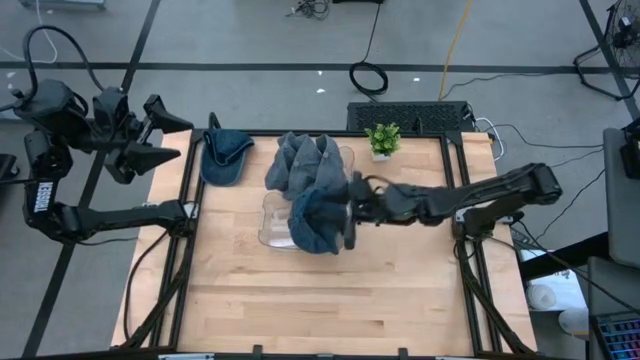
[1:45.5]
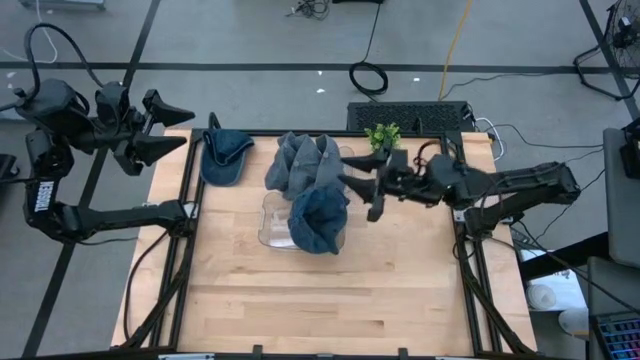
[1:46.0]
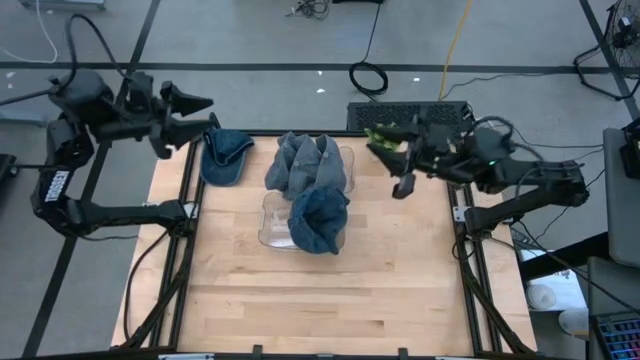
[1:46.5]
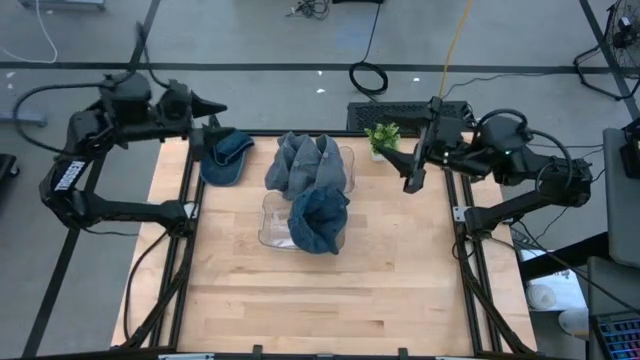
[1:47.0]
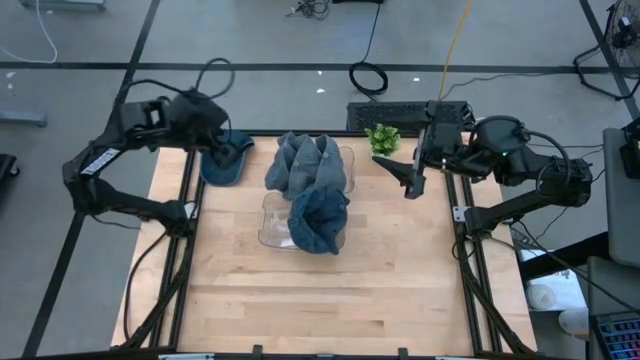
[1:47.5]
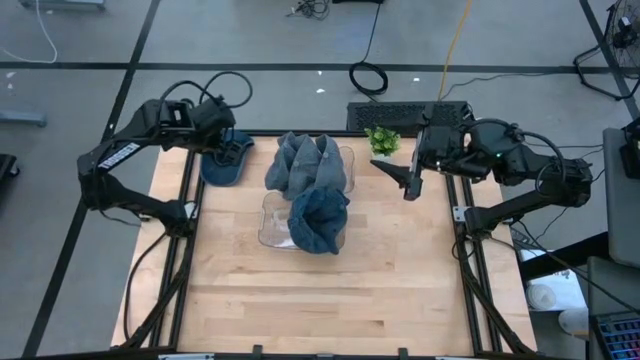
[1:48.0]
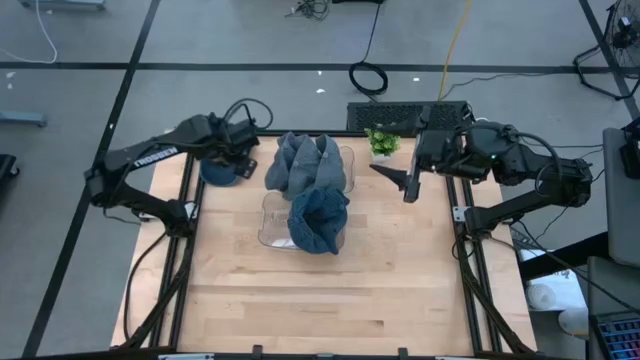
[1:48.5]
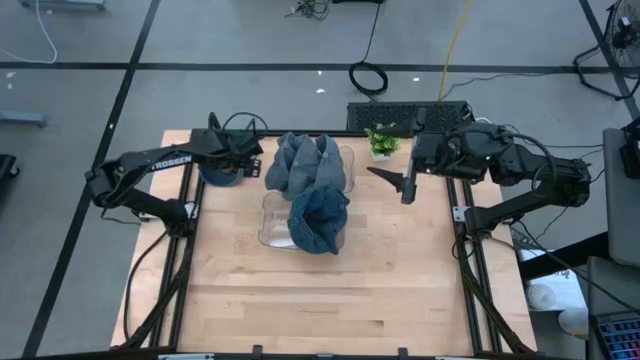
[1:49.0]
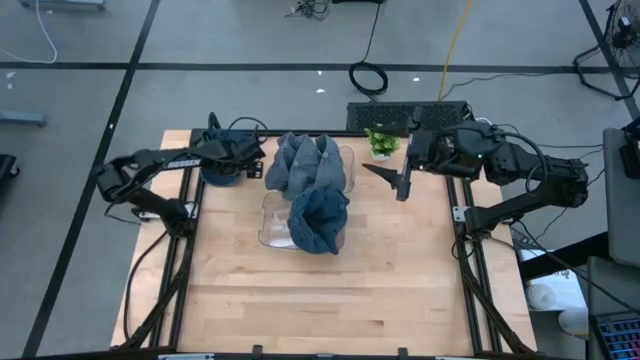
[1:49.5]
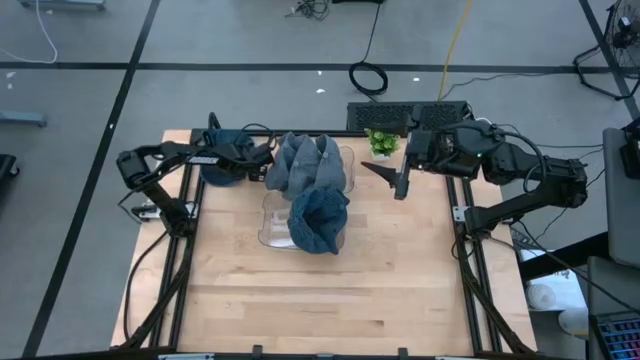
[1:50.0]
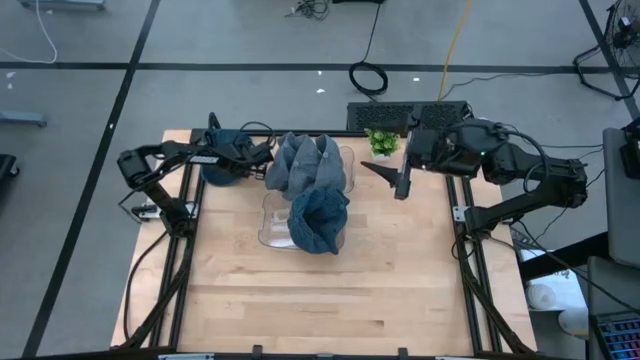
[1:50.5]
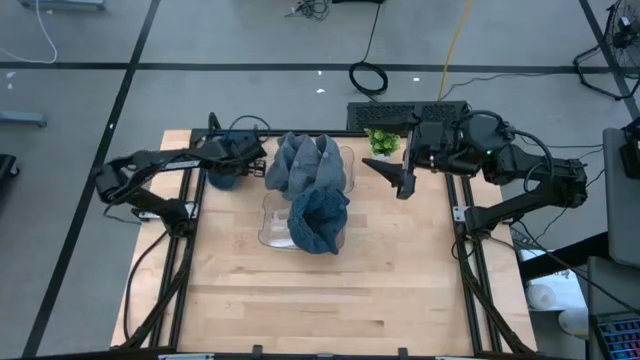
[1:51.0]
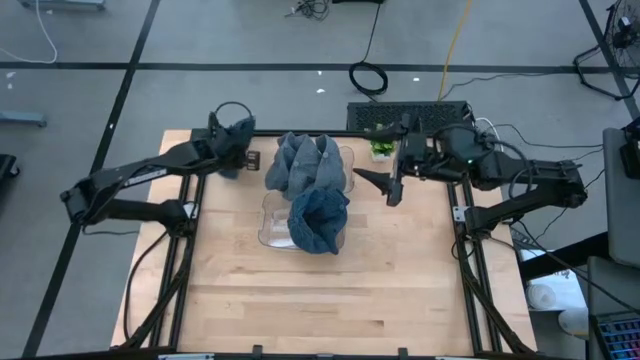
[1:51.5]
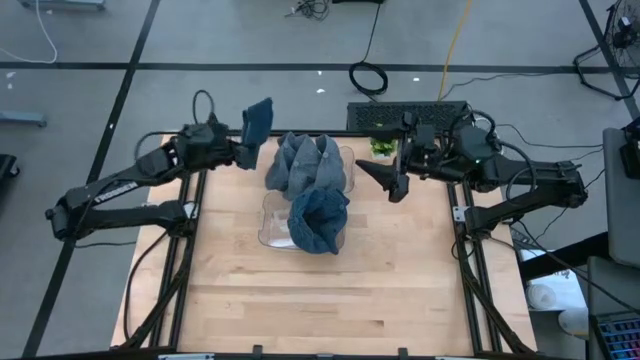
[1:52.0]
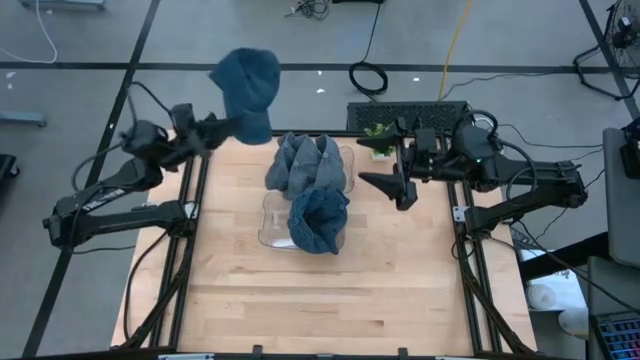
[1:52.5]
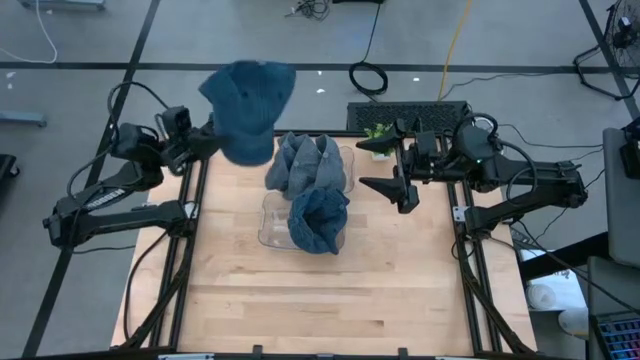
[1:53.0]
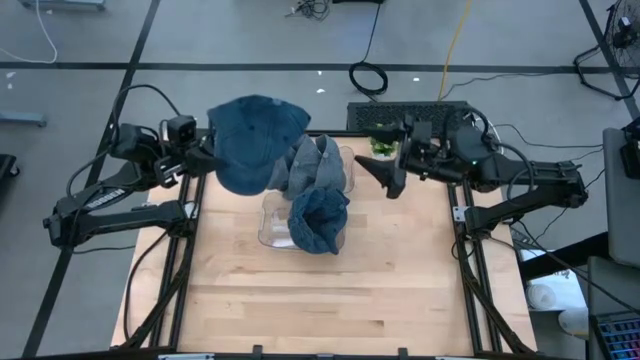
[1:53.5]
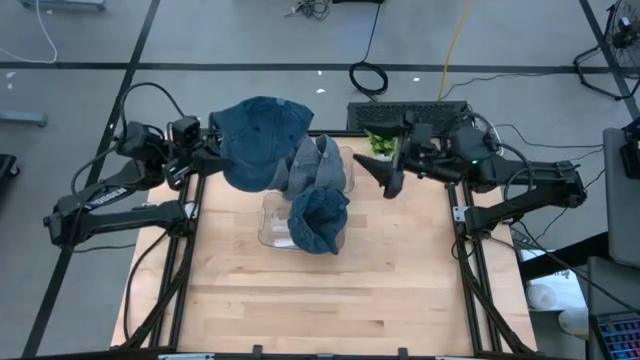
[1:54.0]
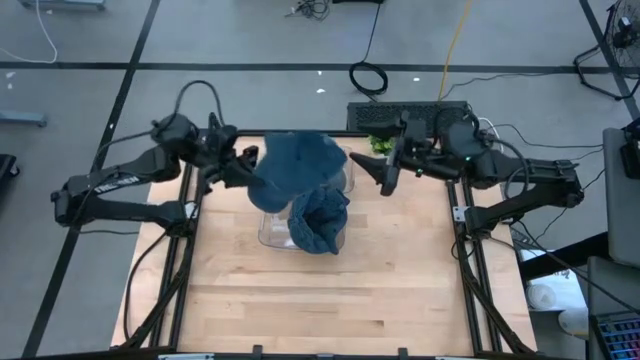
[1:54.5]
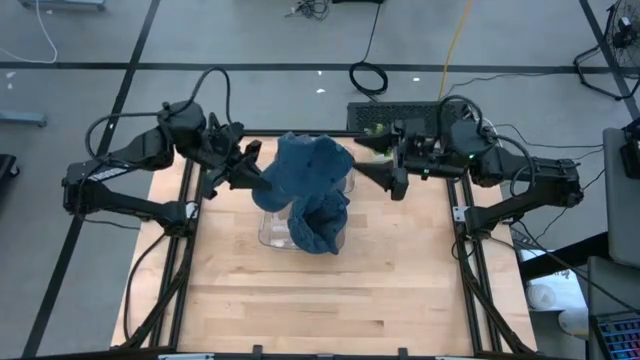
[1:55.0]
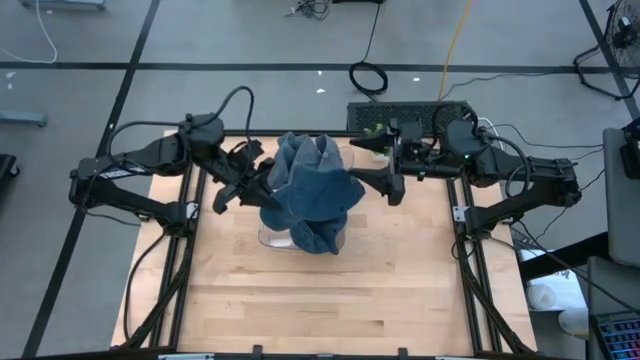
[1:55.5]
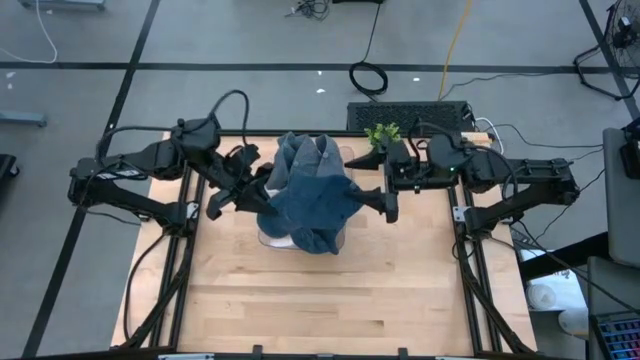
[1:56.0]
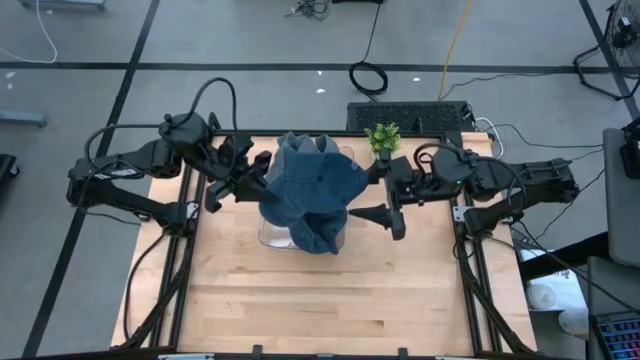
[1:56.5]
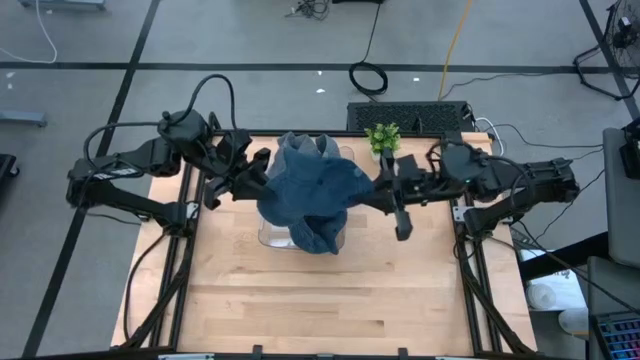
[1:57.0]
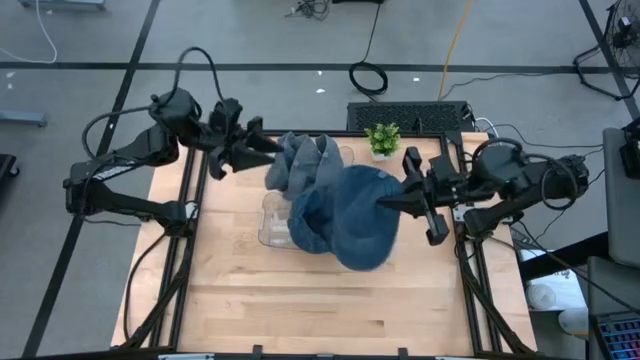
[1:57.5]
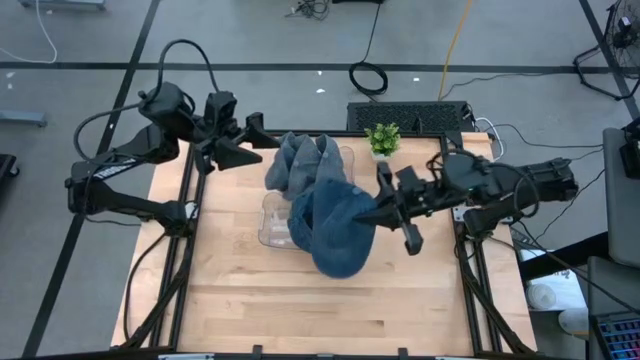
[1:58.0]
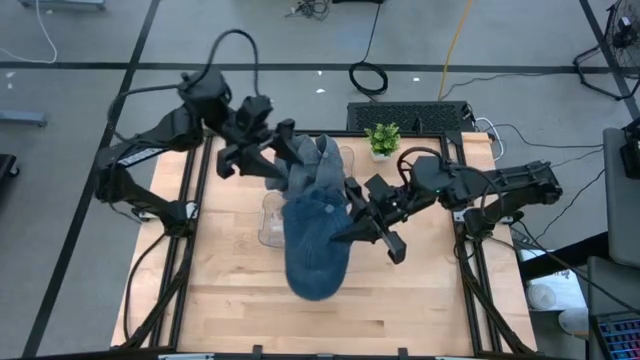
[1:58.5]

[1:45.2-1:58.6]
Task: Pick & Place hat
Put the blue cap into the bottom transparent bin

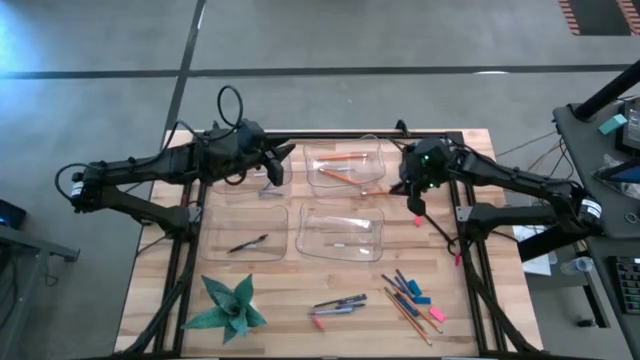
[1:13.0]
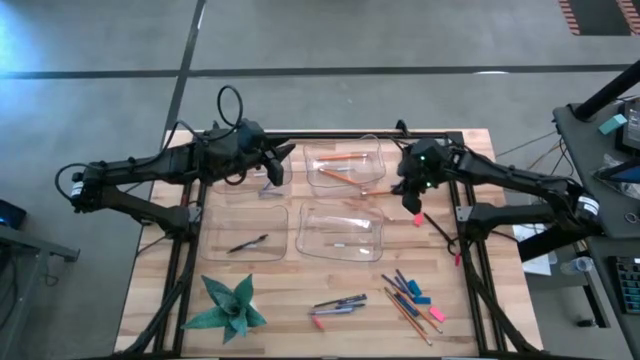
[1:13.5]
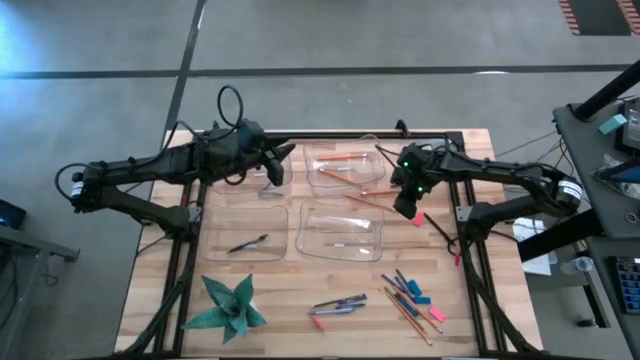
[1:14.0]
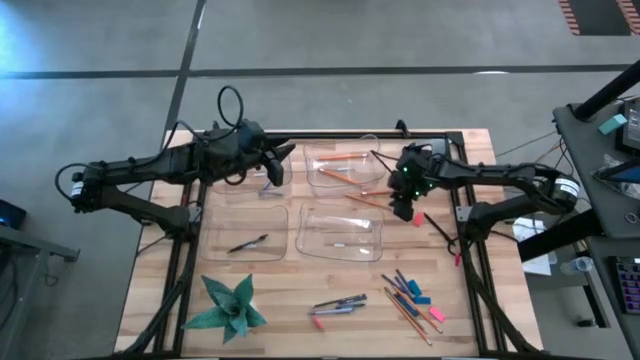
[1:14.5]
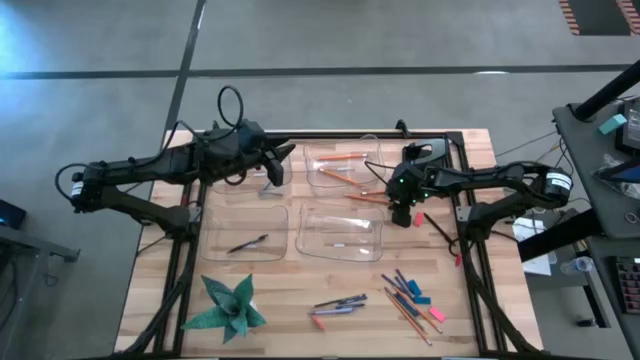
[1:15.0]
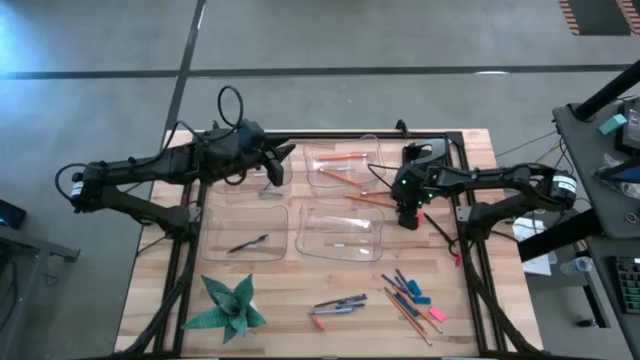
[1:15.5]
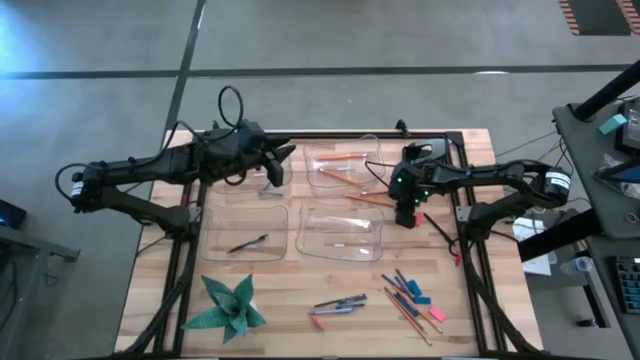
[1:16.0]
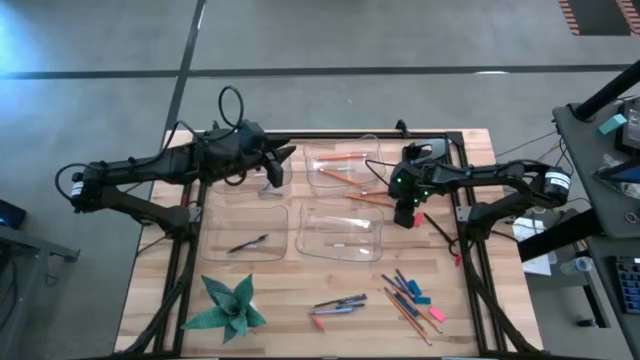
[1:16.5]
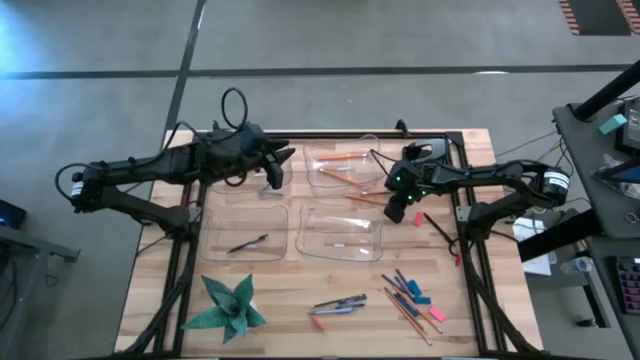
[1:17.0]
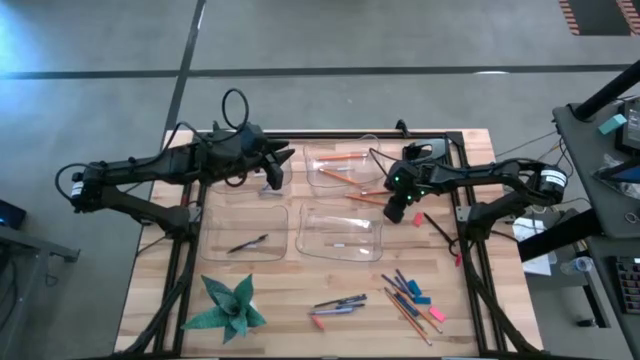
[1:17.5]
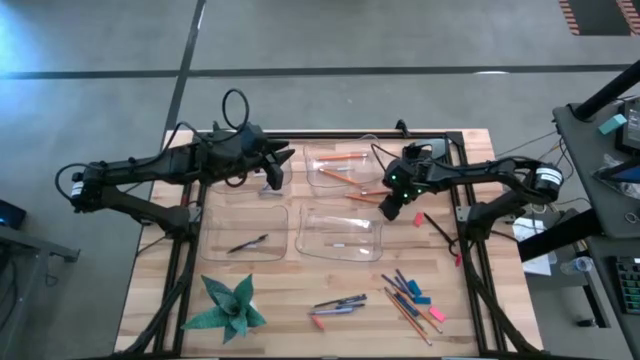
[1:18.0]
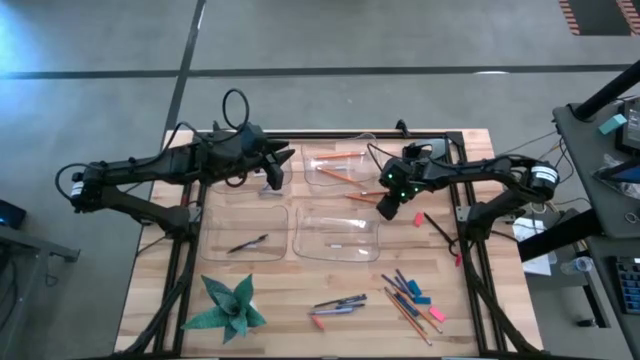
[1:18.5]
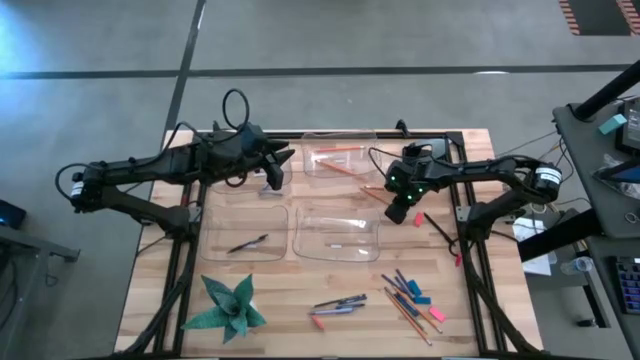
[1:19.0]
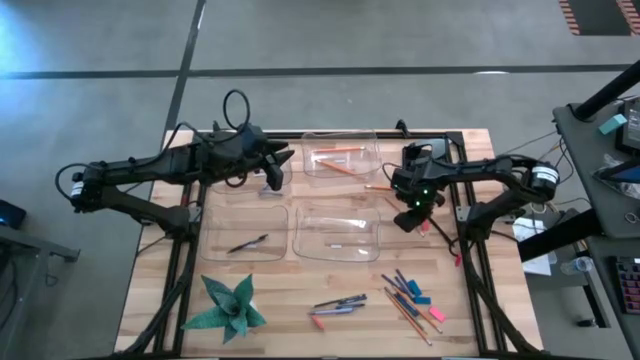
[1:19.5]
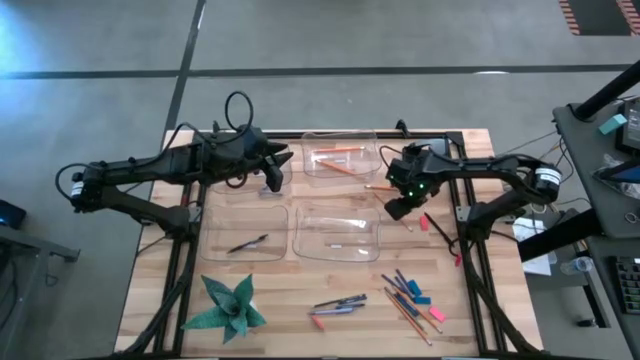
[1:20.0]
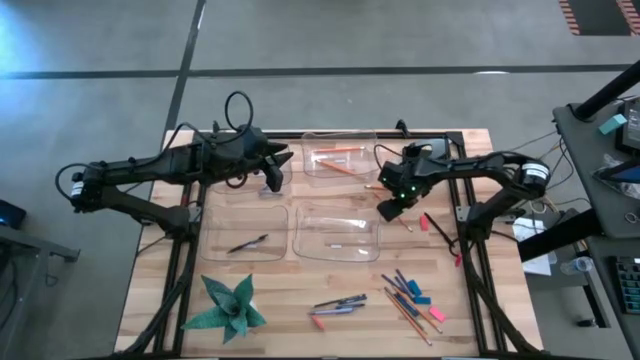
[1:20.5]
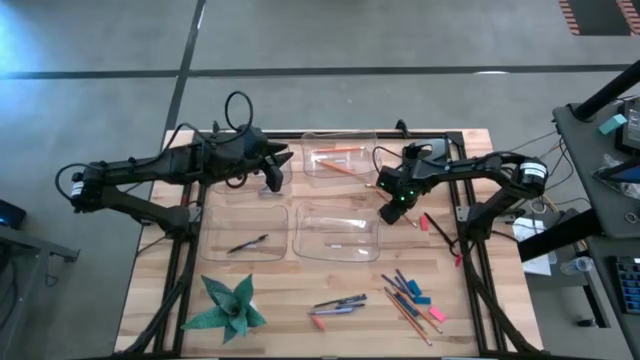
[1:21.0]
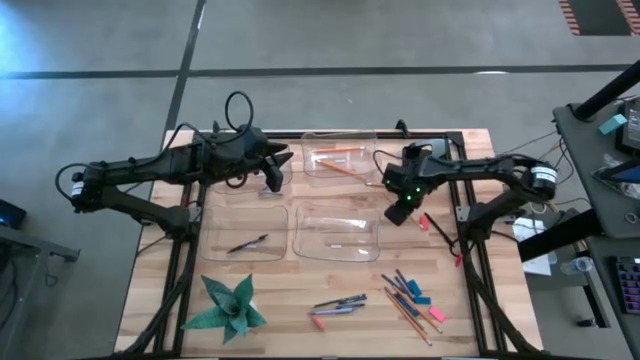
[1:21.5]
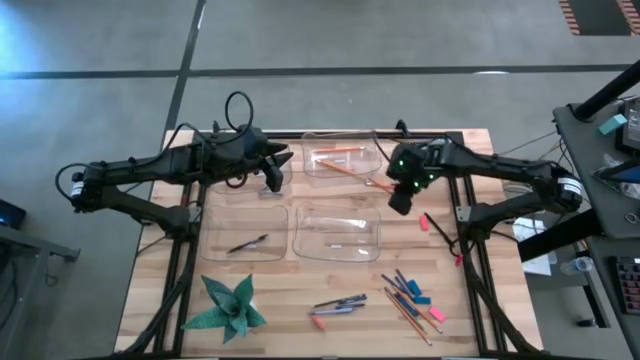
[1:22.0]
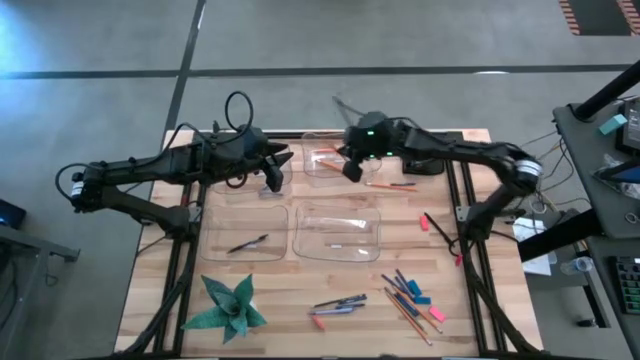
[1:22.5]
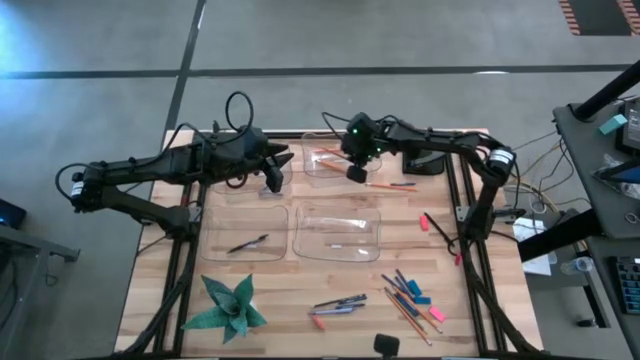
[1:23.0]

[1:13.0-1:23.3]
Task: Sort crayons/erasers/pens/pencils in bins
Put the orange pencil into the top right transparent bin
